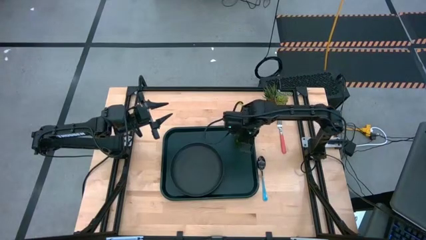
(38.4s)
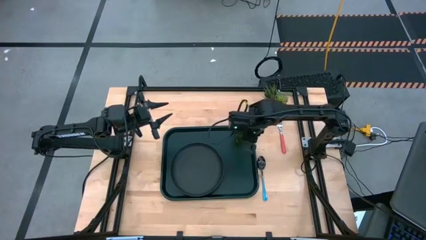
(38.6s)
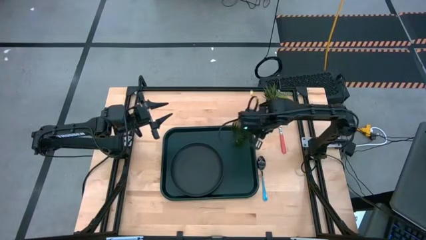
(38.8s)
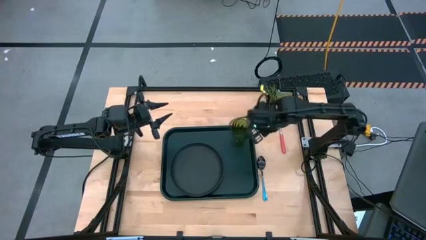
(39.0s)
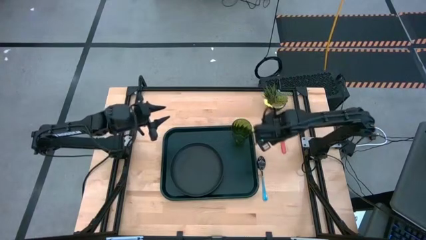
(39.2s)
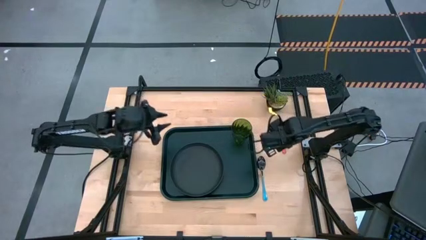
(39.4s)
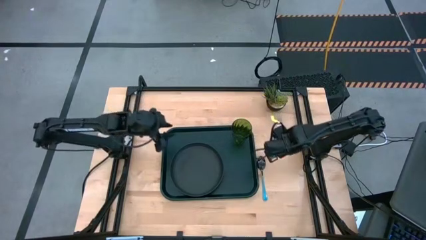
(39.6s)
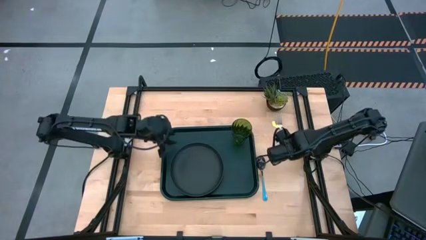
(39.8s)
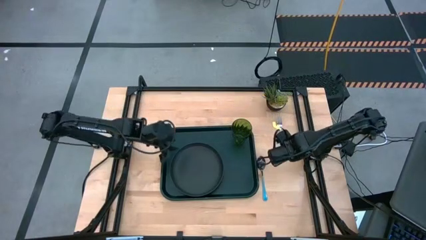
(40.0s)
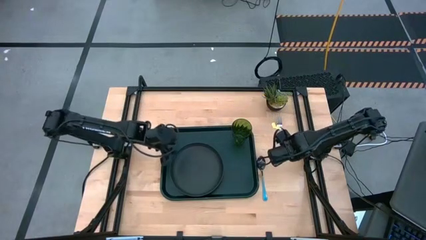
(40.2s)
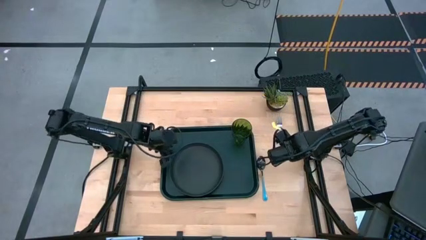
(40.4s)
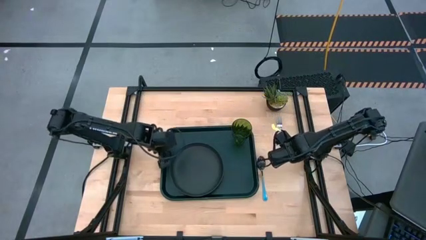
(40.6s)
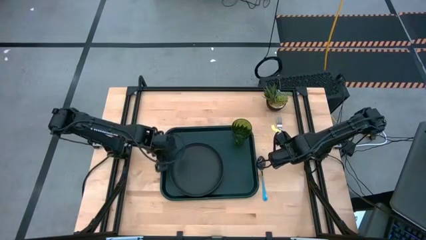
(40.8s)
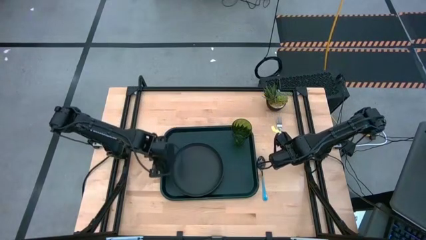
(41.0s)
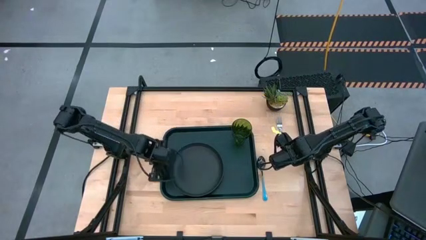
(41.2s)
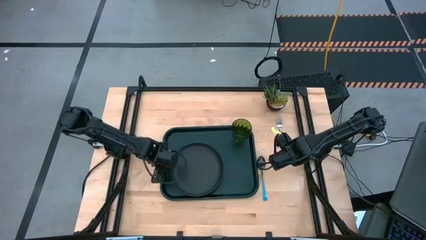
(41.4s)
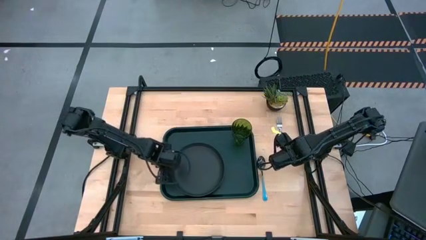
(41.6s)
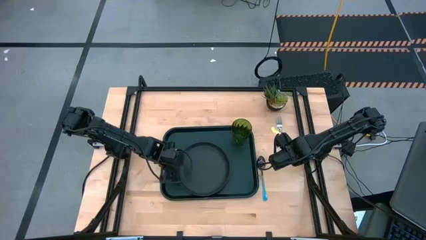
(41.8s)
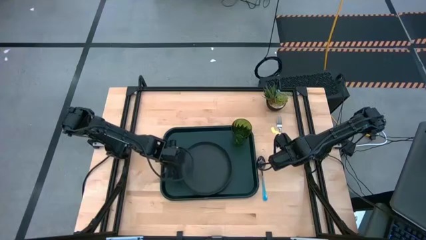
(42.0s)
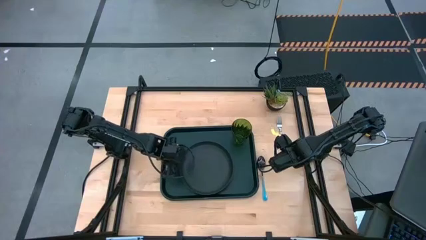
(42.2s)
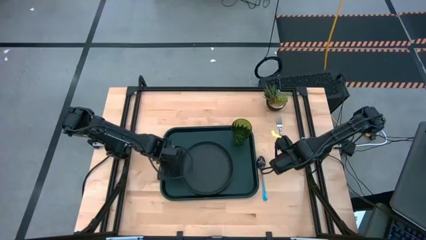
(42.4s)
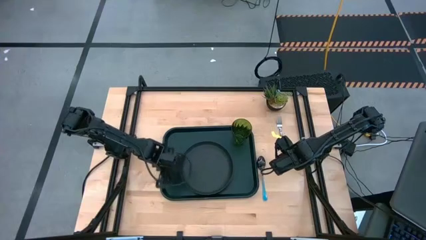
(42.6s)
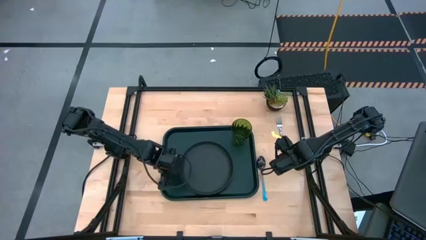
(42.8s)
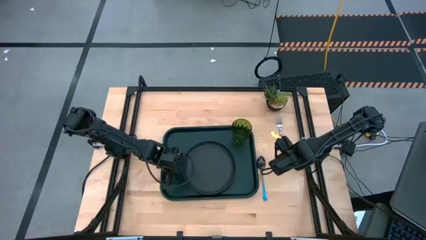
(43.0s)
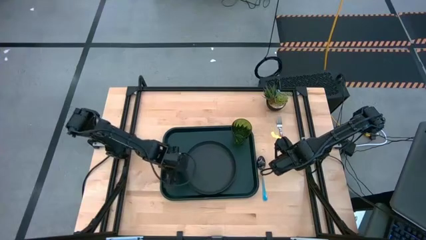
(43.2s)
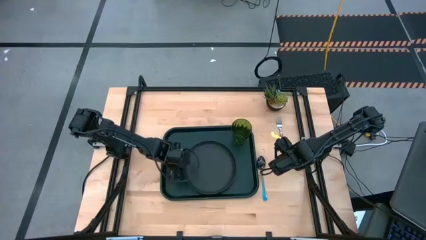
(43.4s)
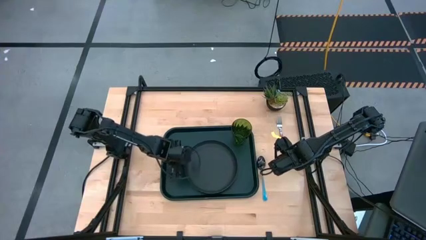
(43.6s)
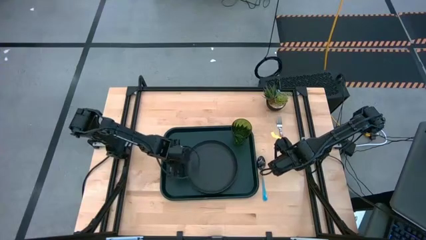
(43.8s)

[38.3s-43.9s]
Task: Pick and place plate/cup/fork/spoon on tray
Adjust the black plate

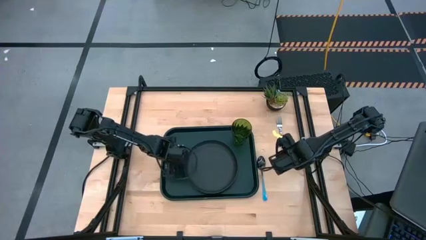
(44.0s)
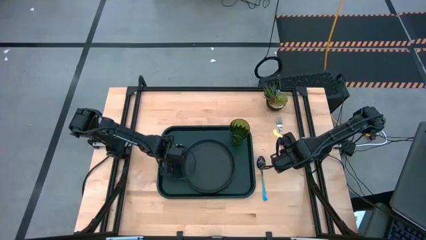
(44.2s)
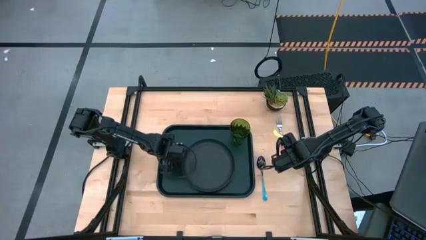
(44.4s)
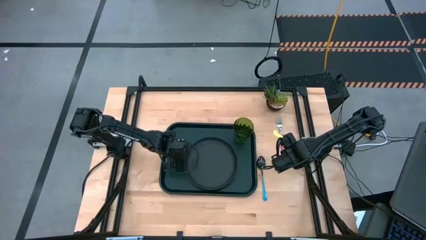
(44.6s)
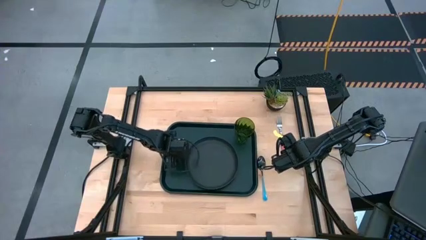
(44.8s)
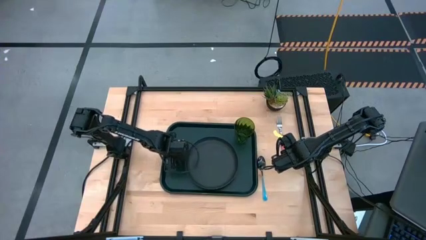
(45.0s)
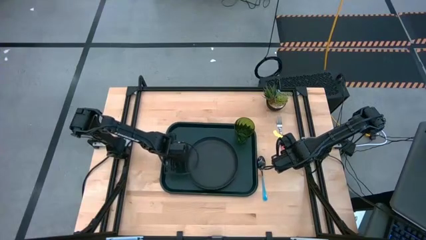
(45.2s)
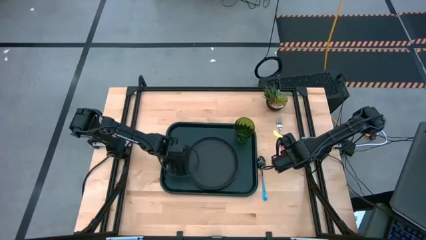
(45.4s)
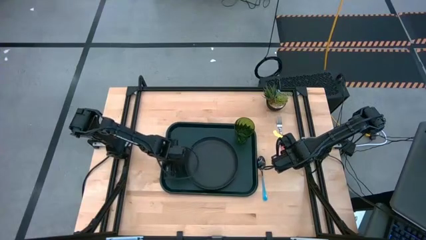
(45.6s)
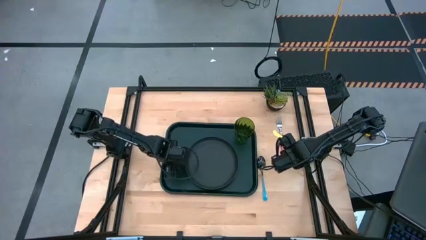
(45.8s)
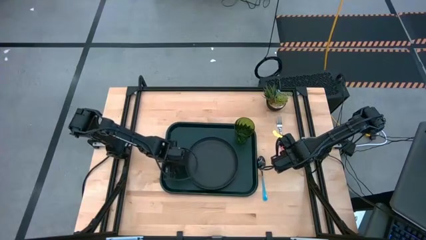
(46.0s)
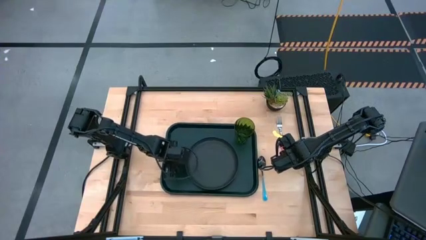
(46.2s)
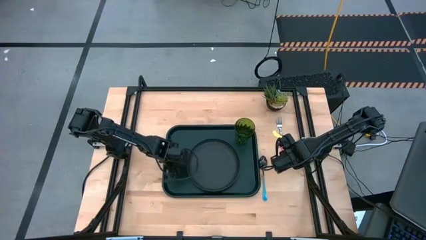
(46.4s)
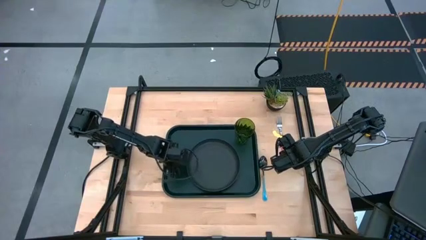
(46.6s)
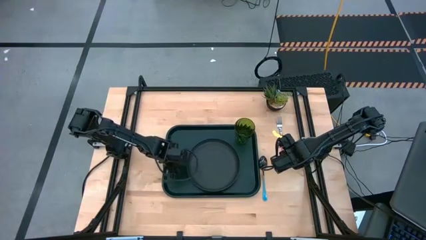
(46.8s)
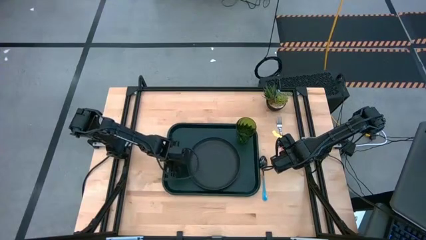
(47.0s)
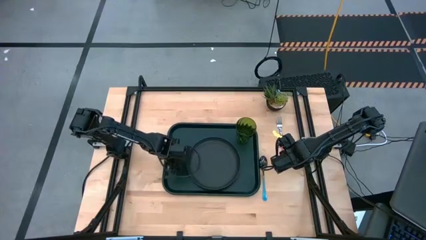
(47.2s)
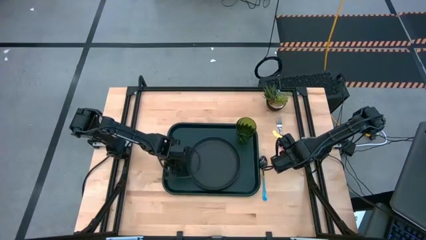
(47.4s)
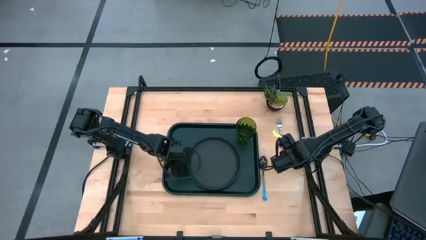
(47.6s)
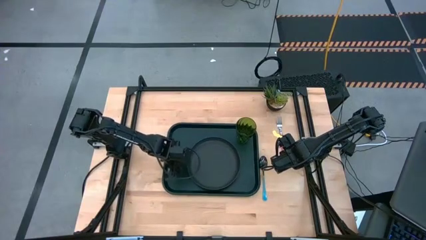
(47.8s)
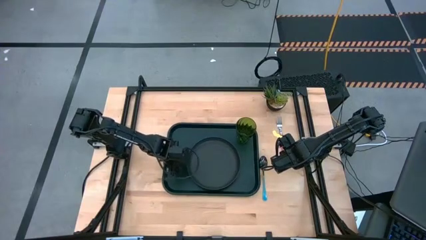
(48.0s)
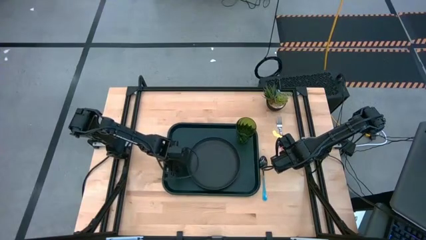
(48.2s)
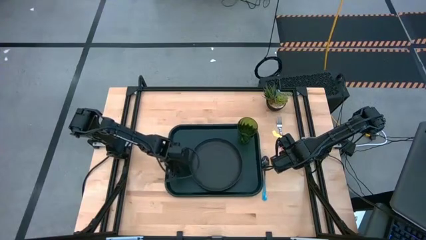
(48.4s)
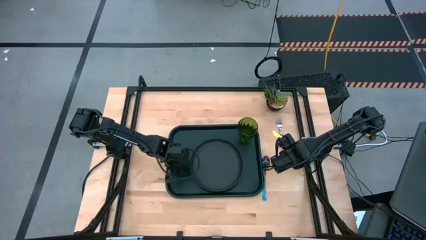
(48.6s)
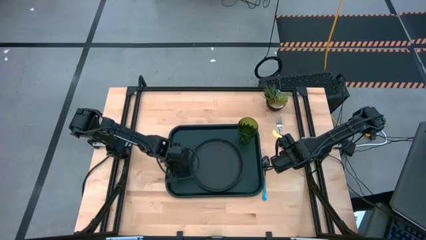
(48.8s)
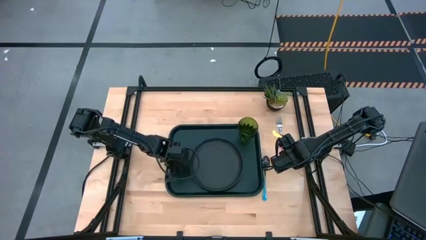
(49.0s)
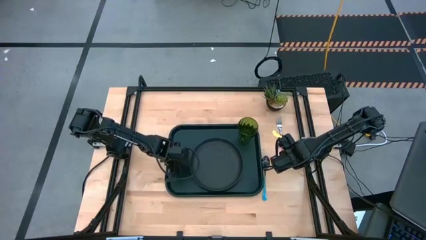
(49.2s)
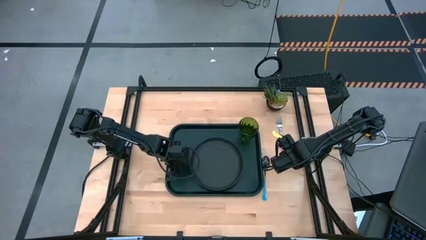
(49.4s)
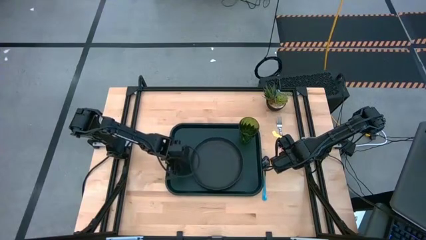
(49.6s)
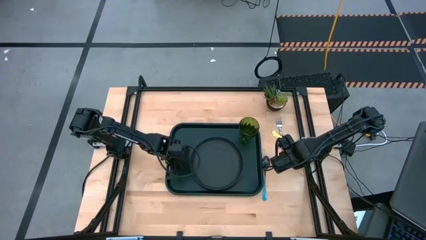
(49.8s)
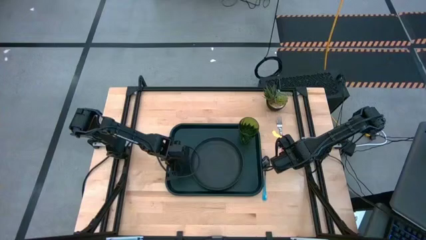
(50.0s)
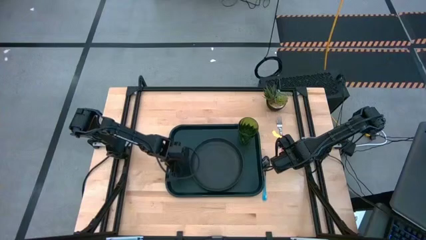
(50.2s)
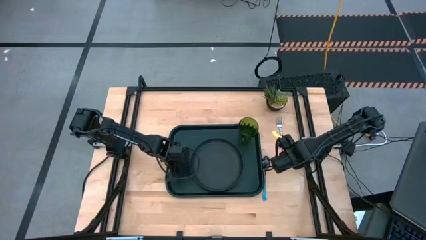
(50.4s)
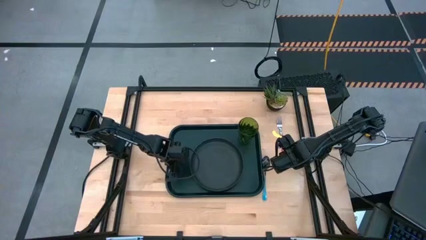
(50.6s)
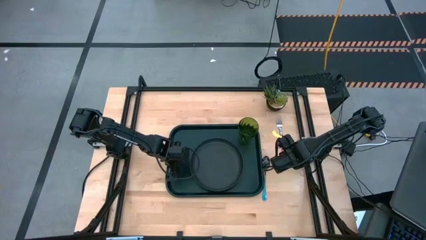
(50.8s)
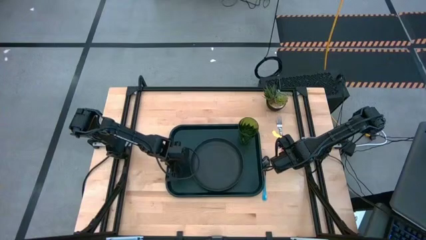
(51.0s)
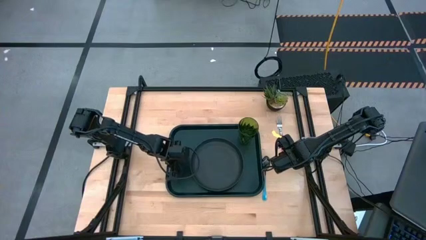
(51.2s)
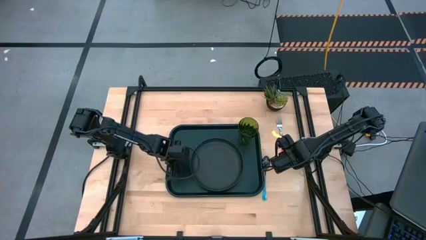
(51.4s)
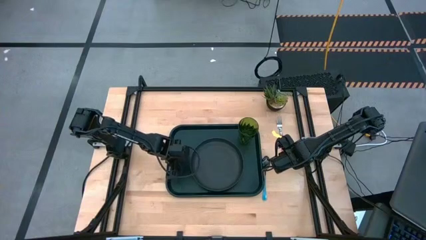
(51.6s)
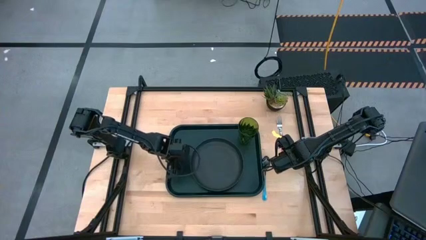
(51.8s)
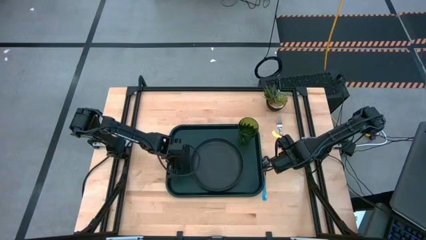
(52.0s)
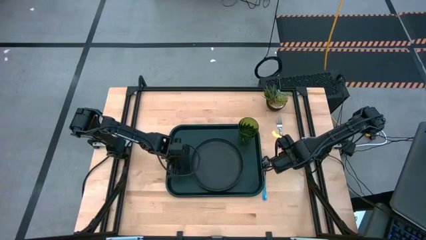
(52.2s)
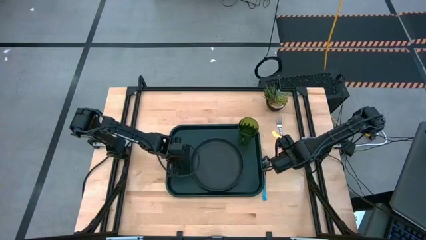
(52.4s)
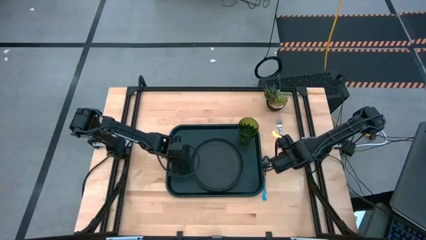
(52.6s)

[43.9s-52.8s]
Adjust the black tray

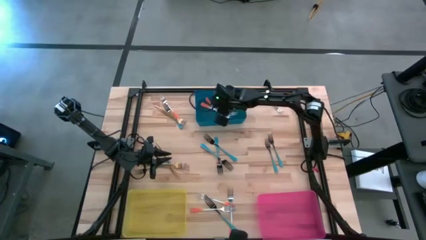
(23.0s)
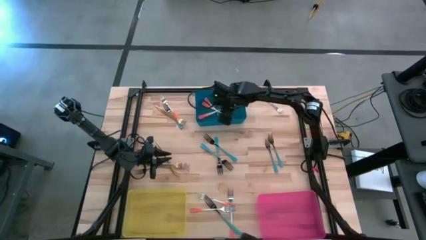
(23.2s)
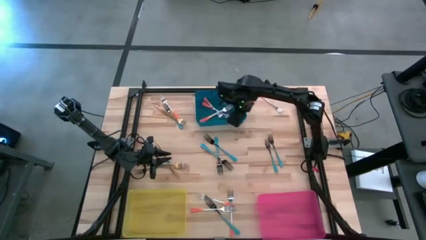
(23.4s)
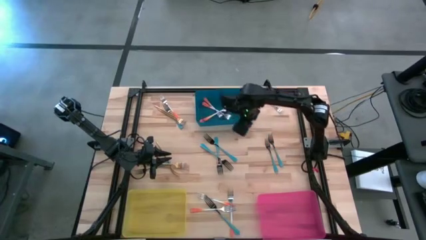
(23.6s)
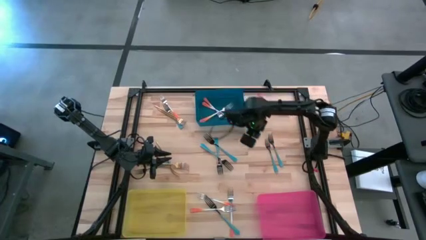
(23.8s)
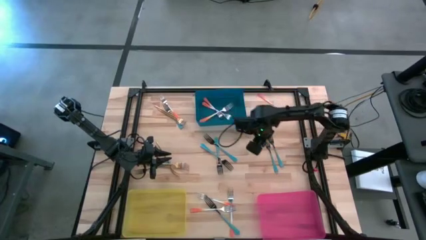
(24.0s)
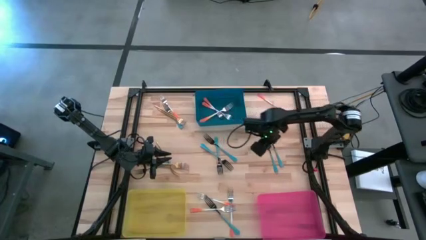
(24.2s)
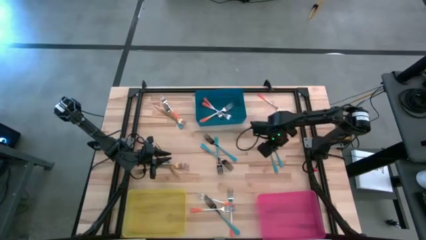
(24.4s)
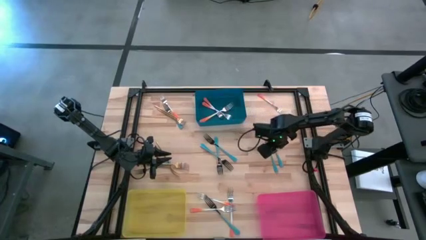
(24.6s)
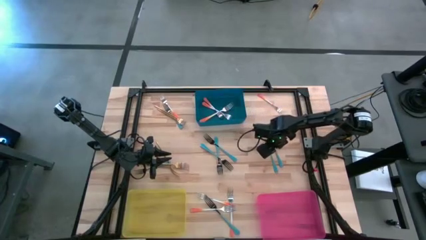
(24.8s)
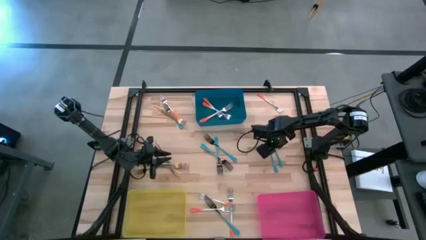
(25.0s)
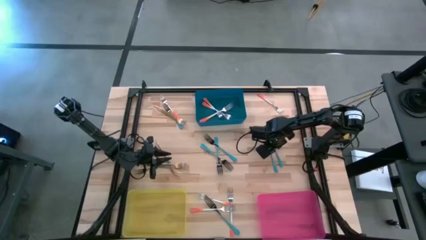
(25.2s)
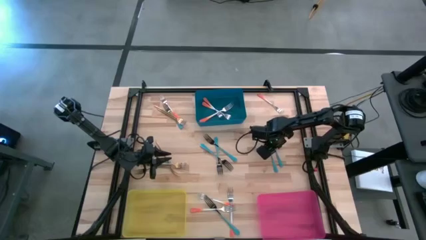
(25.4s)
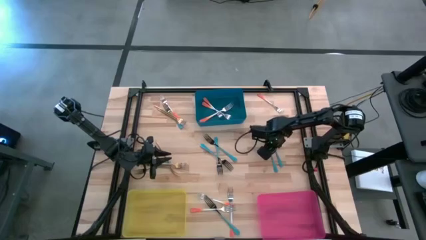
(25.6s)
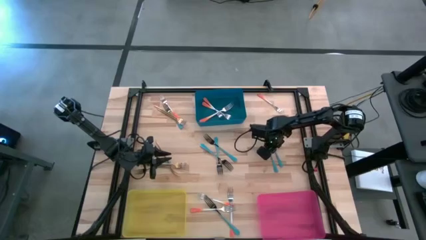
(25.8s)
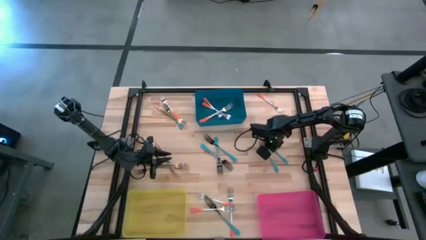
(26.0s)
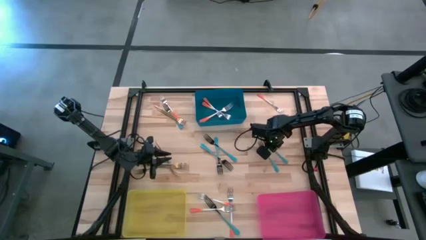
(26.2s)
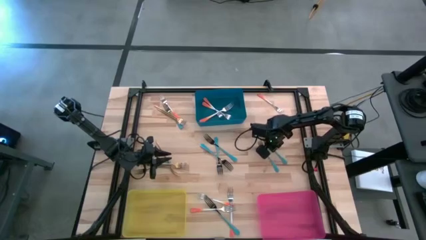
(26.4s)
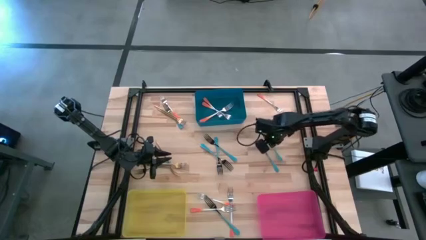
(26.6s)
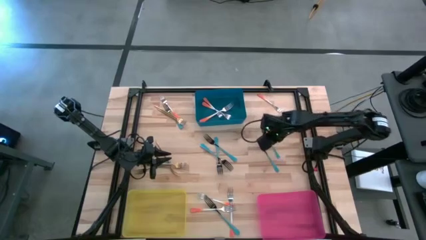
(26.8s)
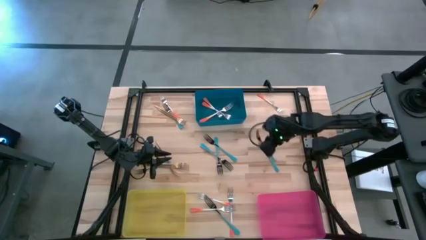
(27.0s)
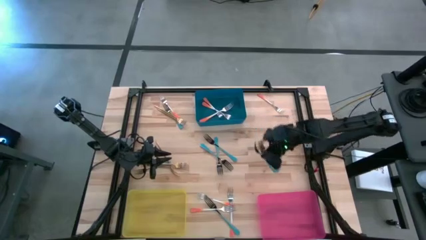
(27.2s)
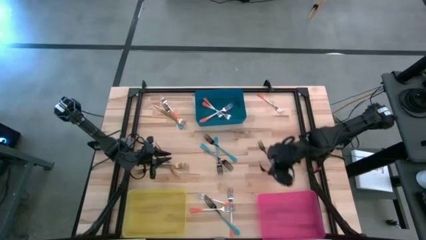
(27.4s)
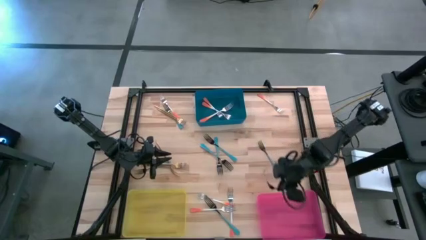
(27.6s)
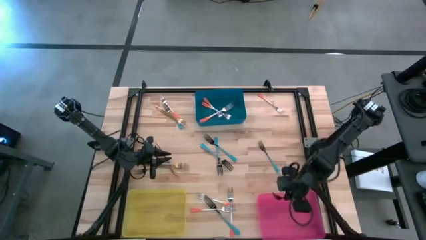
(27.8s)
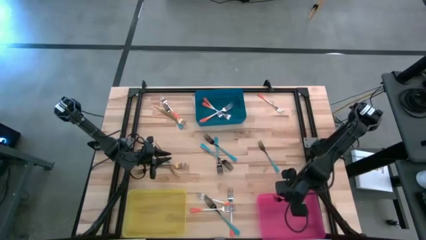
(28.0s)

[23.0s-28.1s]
Task: Sort silverware by color (type)
Put the blue fork into the pink bin
